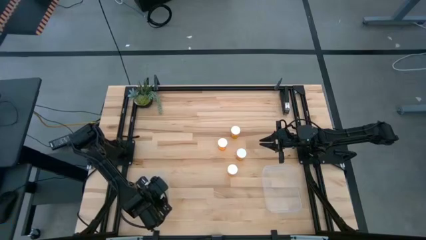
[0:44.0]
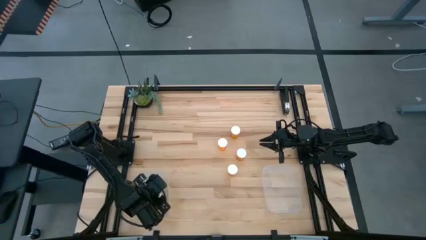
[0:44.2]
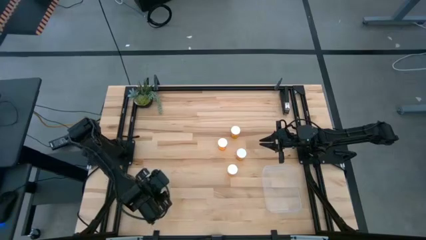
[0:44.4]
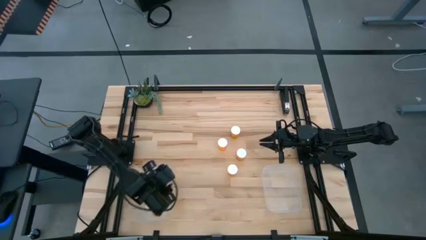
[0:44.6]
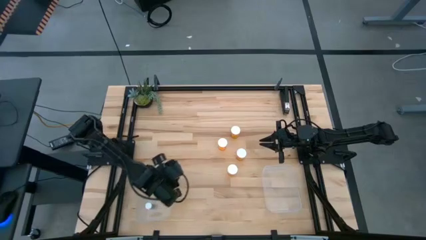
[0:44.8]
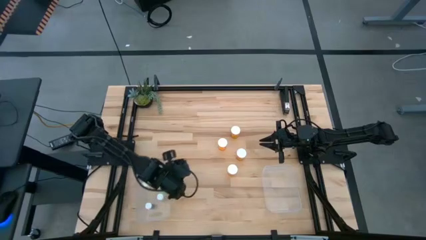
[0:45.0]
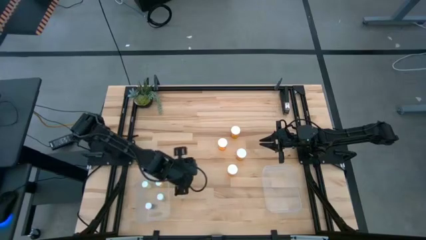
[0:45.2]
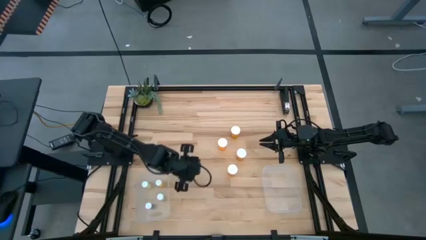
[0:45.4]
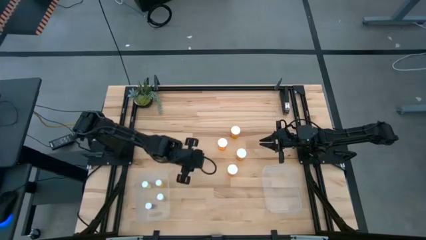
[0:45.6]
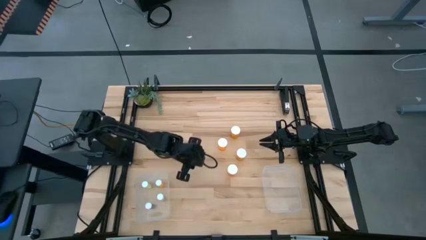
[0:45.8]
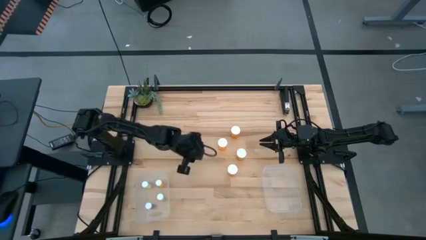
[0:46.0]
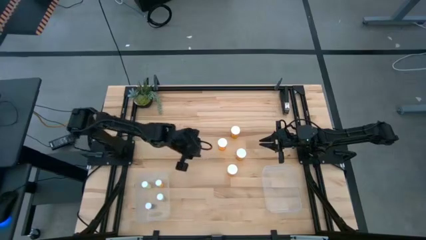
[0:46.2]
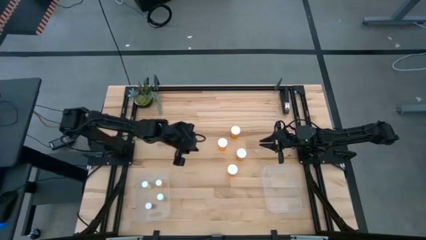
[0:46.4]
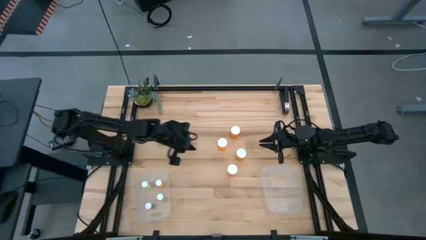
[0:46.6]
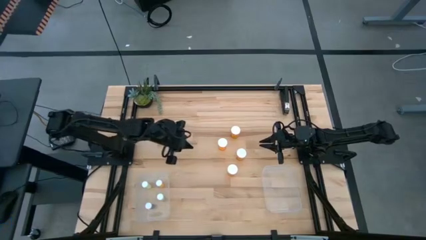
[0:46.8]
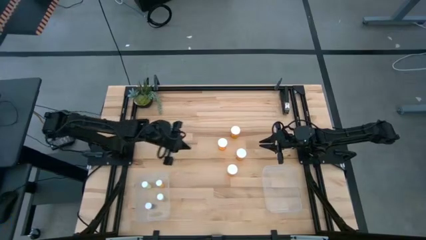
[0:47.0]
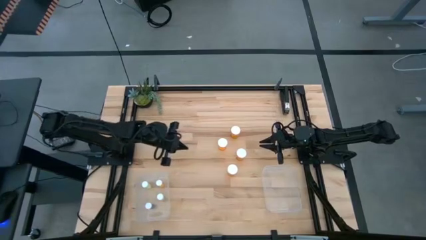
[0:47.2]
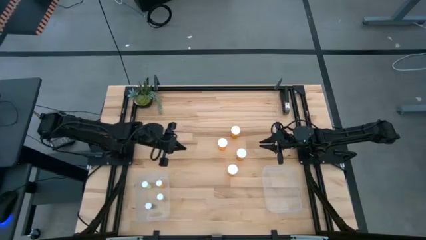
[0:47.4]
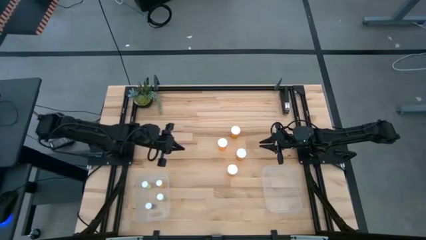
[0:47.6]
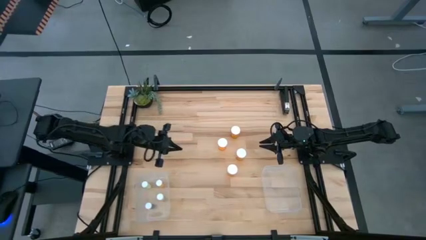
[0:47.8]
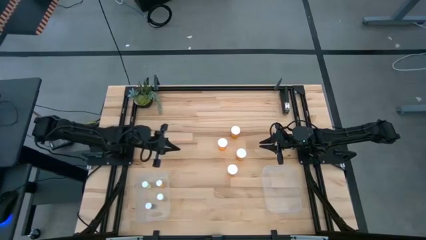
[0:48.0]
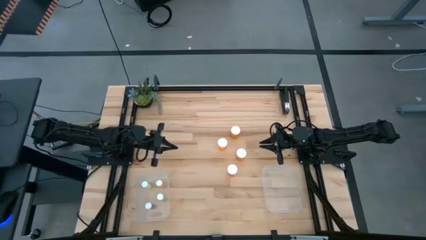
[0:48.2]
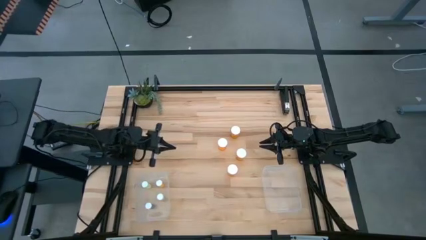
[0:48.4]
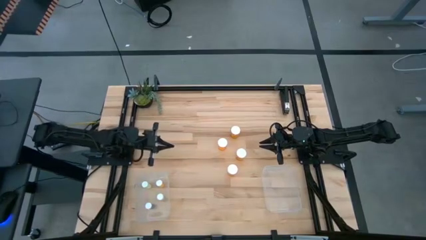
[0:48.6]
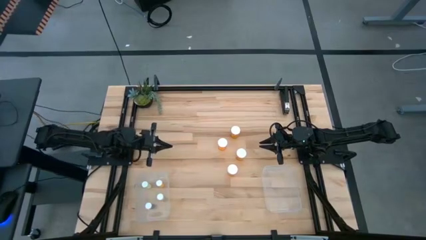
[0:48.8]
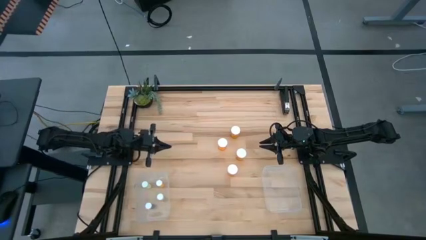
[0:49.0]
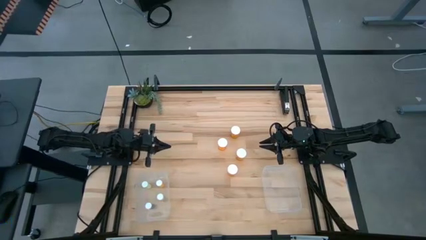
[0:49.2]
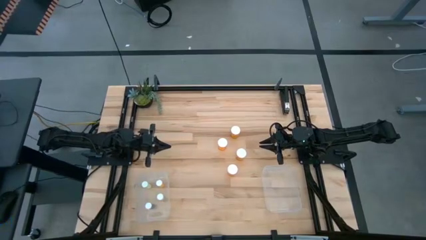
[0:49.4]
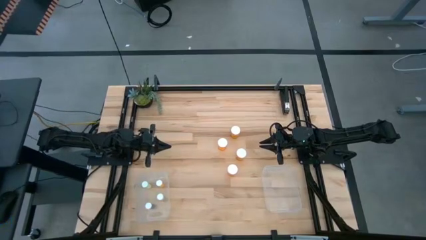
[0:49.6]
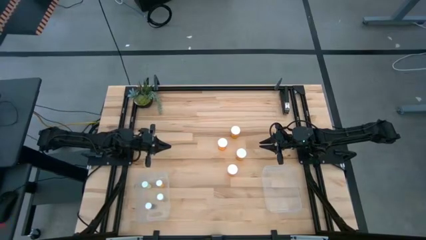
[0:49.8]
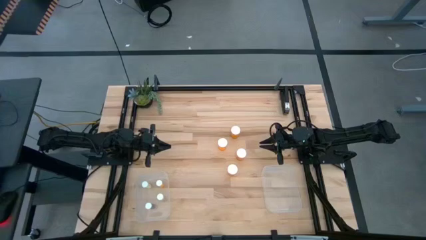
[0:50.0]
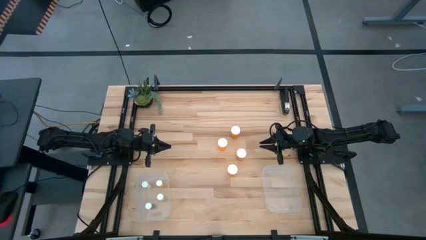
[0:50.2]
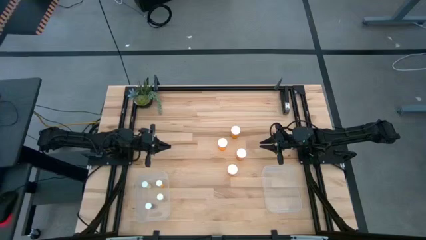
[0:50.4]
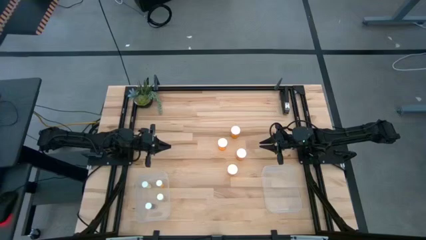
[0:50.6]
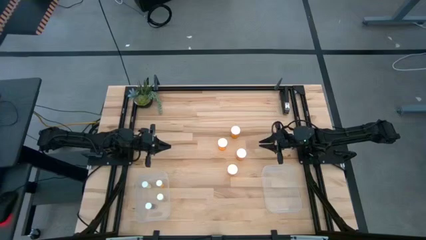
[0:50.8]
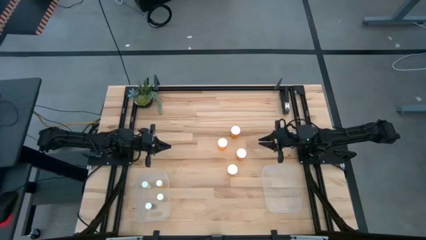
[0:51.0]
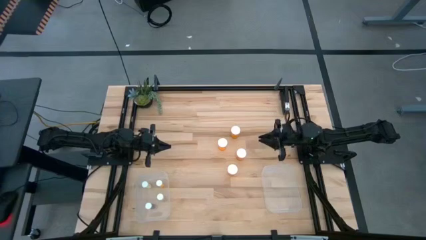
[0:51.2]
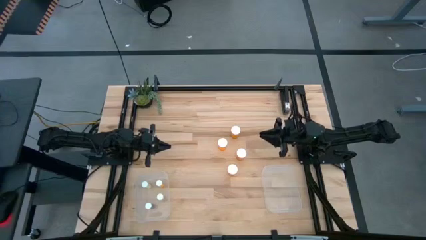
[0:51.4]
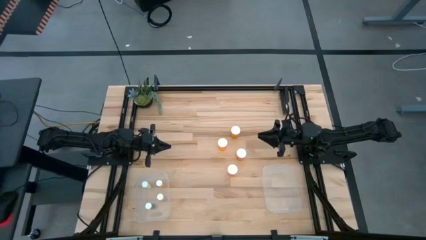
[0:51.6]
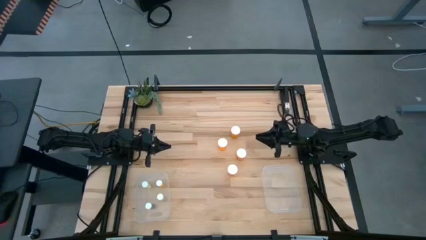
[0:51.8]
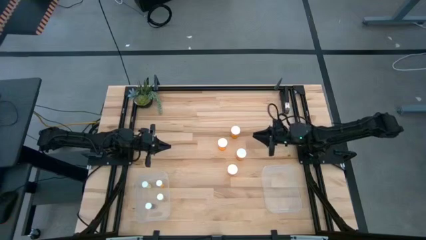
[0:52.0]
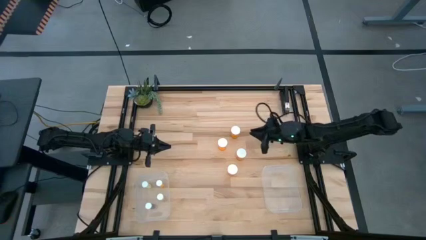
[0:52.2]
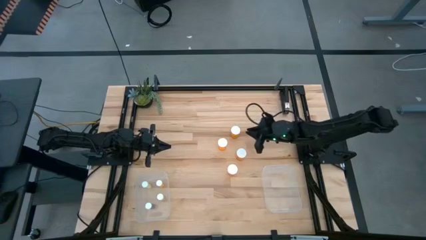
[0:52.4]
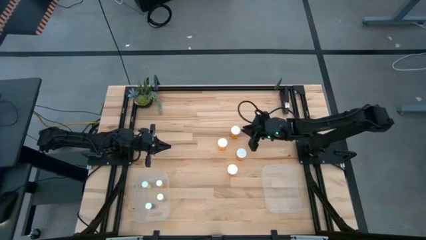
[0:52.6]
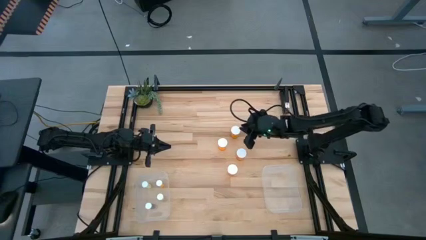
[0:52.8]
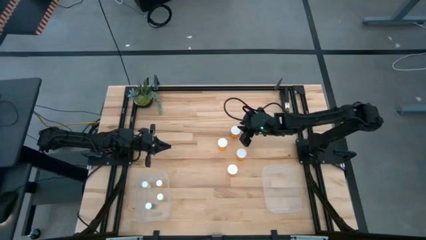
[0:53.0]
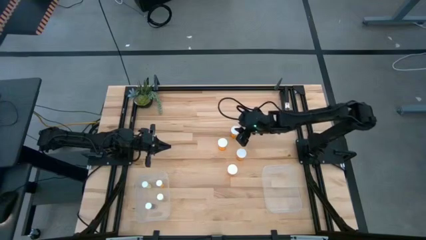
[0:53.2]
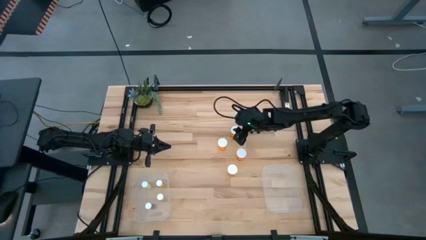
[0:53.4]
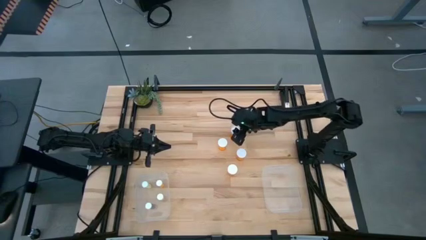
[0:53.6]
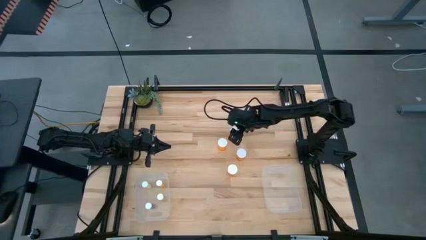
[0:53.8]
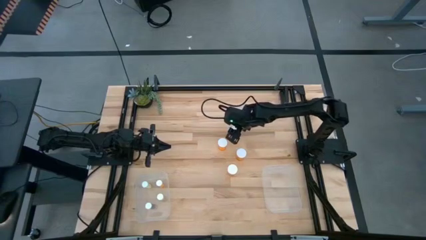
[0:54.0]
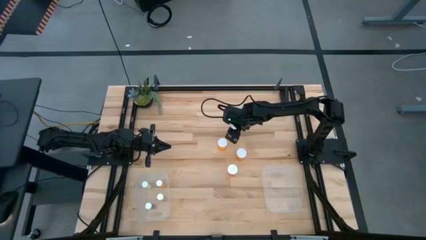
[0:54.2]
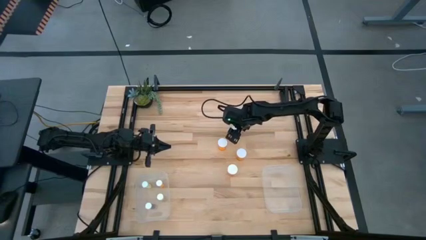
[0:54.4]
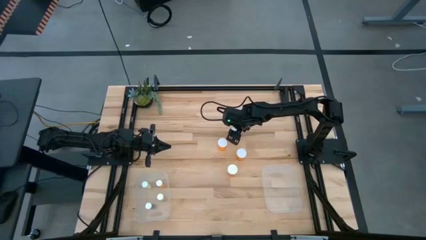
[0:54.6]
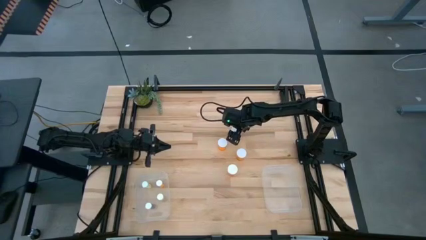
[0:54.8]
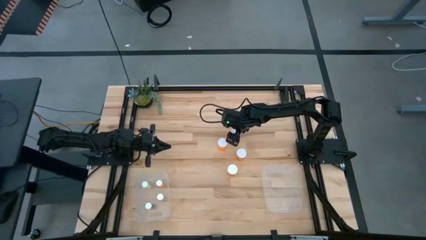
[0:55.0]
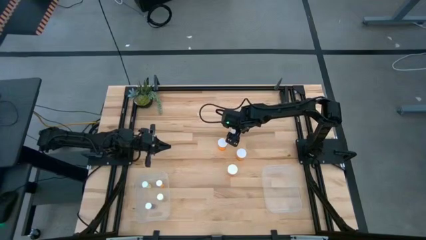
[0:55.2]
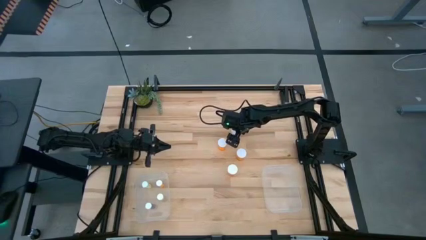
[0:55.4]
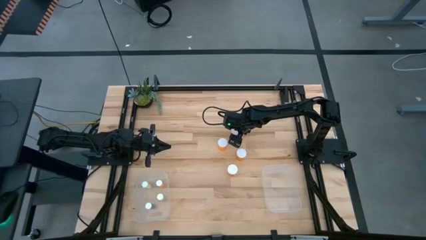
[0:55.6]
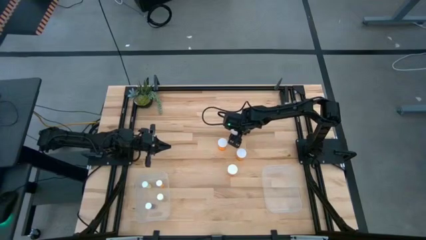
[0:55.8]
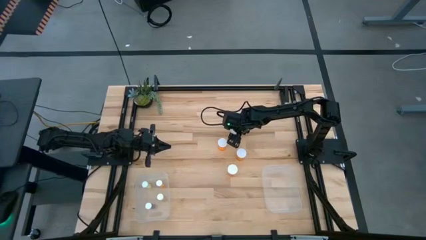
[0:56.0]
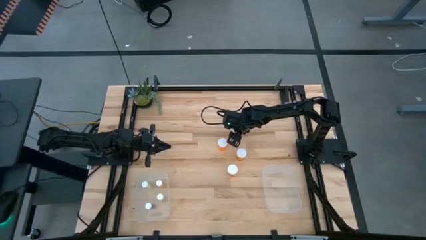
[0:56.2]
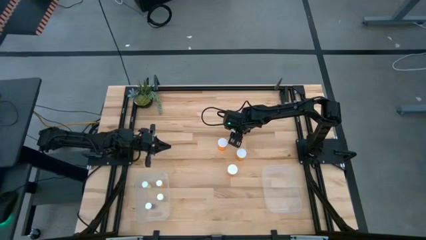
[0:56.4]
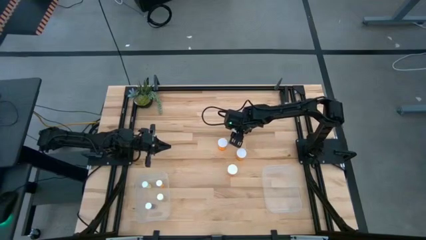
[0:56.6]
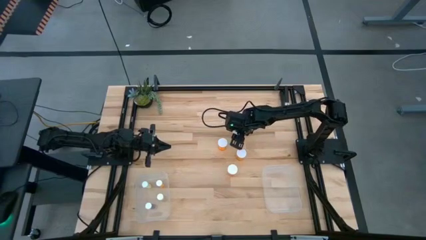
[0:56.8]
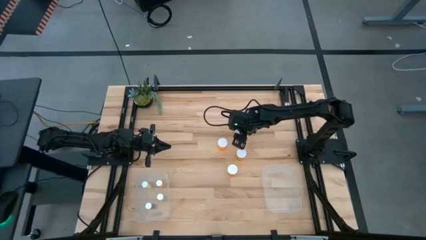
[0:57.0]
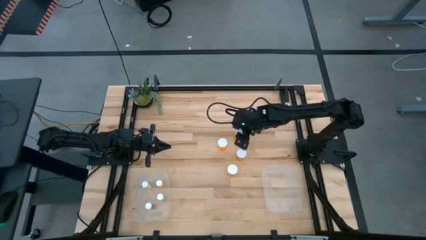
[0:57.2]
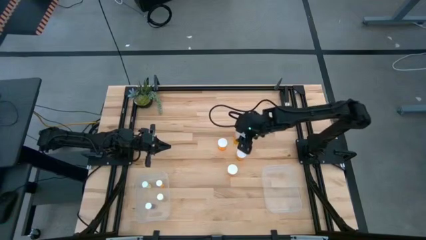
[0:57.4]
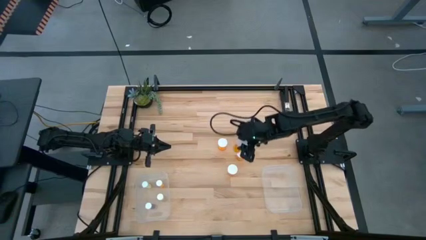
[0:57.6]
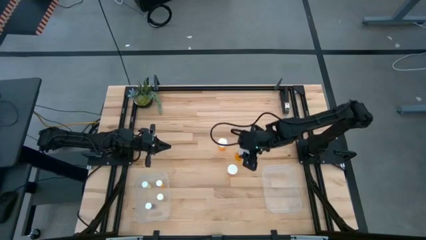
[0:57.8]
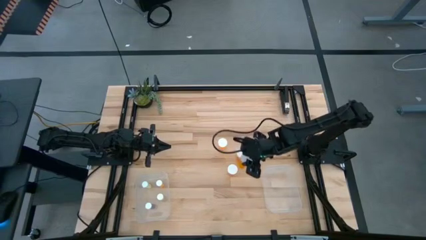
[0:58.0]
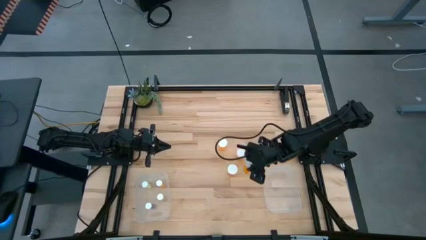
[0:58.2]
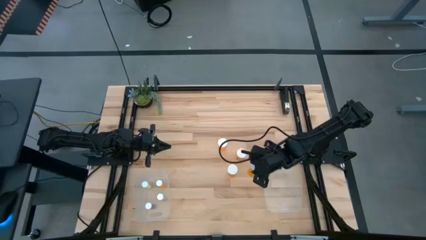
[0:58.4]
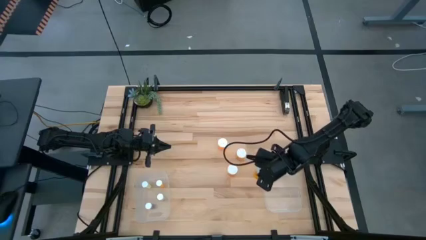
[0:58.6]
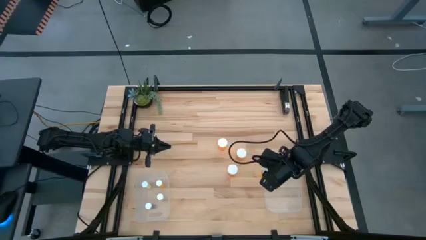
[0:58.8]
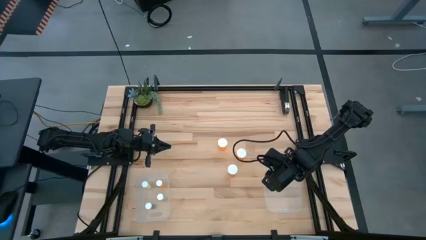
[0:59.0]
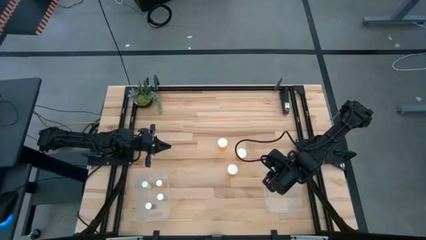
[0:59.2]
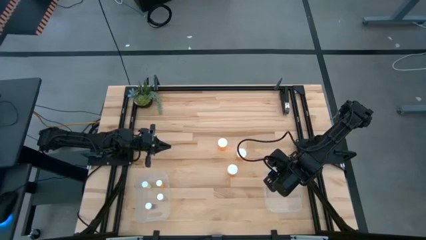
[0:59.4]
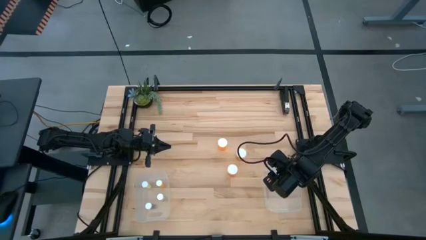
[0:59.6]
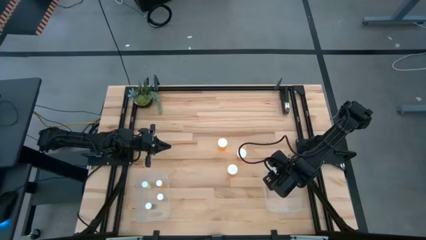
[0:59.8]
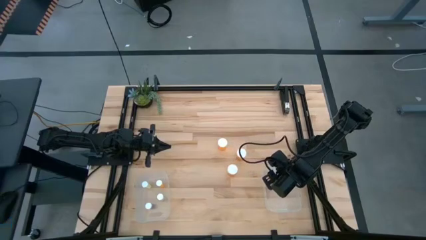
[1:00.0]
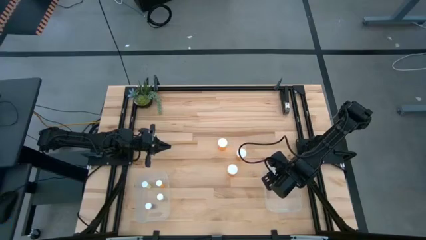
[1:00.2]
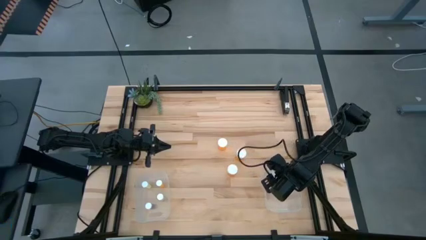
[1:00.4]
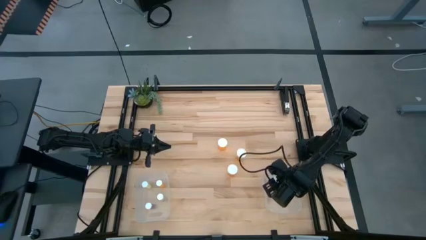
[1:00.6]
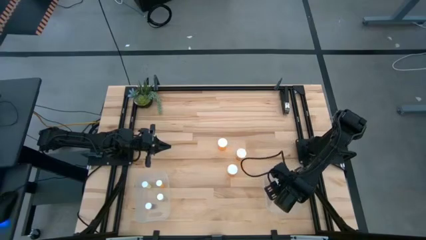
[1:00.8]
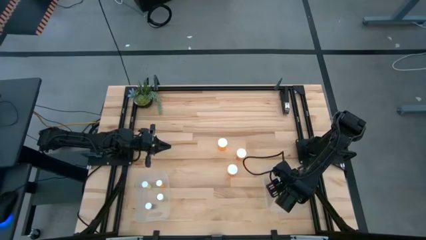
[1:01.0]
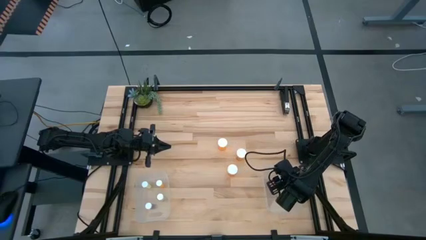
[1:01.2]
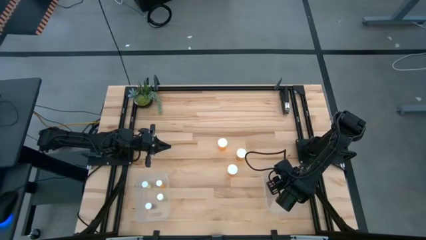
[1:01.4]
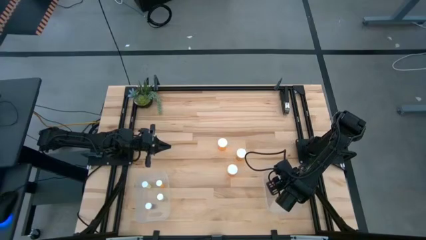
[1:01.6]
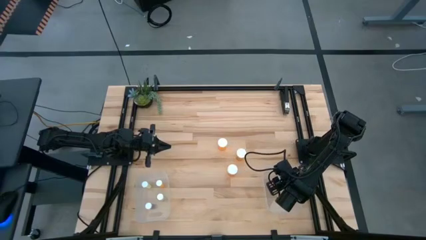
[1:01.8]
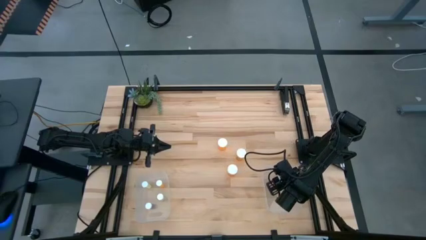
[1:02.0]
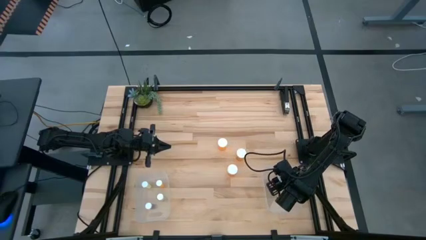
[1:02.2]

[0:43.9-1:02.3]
Task: Pick and place medicine bottles into bin by pill shape (circle, oval)
Put the big orange pill bottle into the right transparent bin
